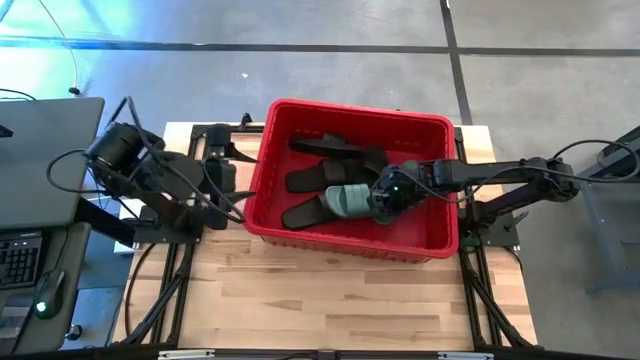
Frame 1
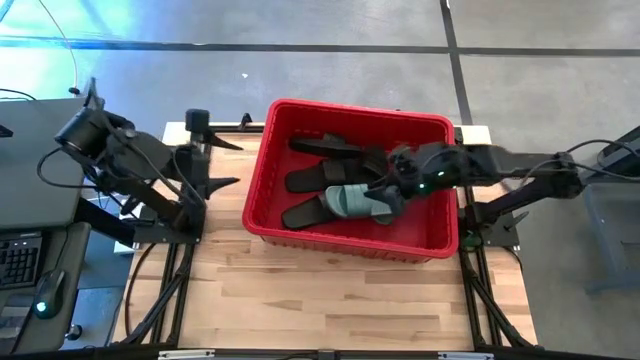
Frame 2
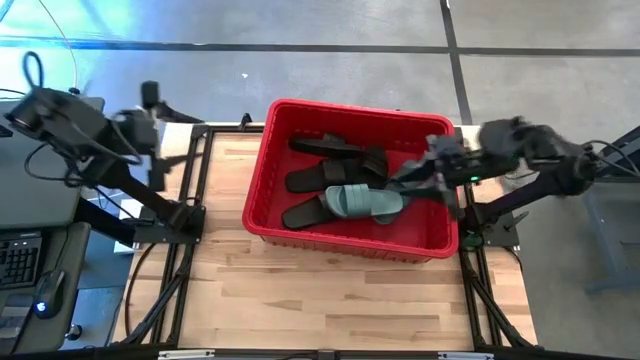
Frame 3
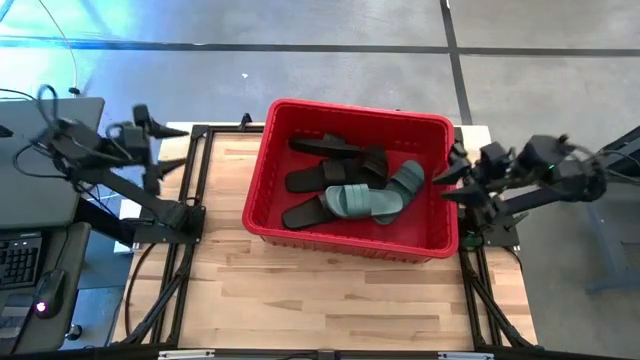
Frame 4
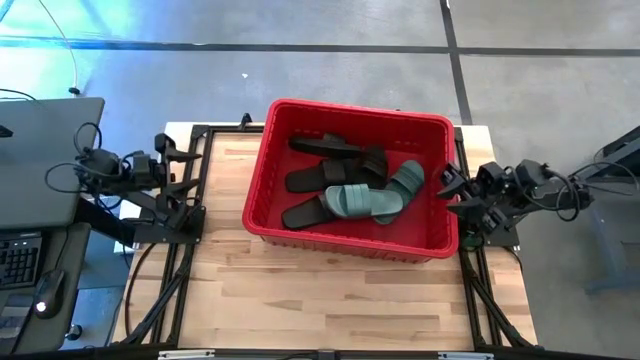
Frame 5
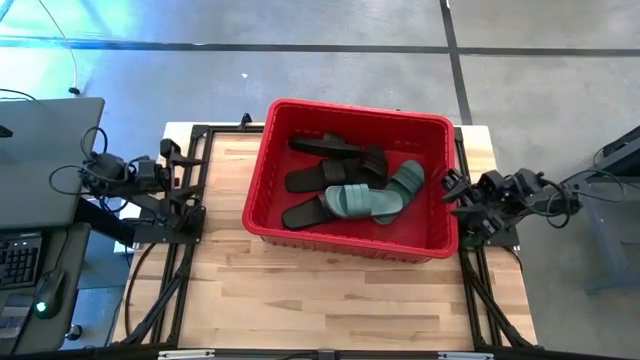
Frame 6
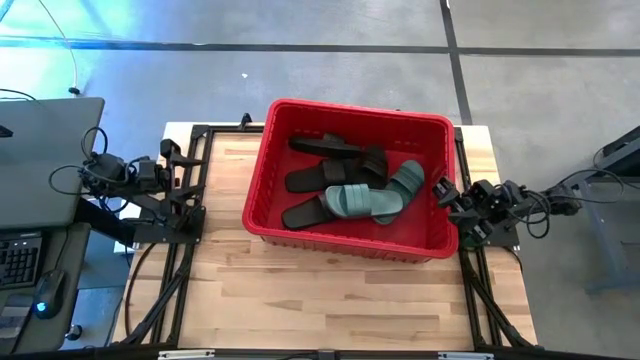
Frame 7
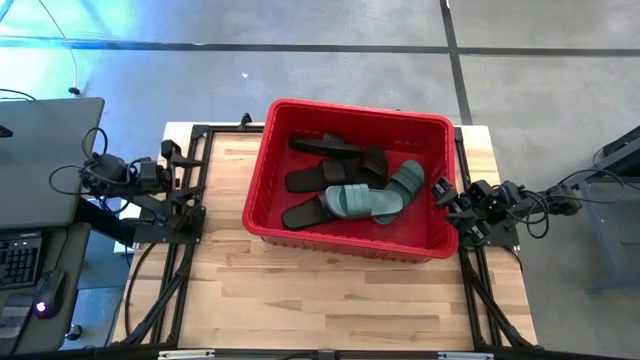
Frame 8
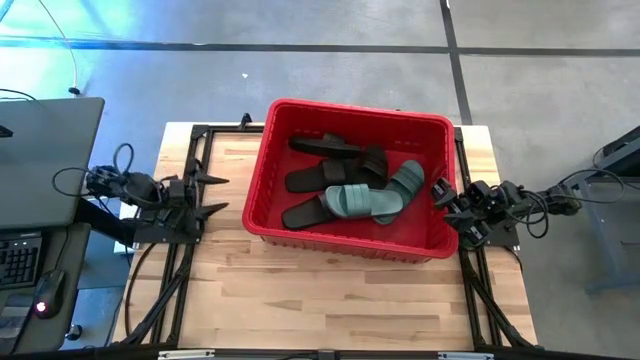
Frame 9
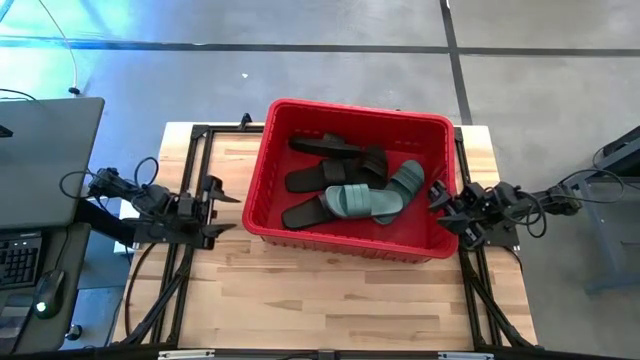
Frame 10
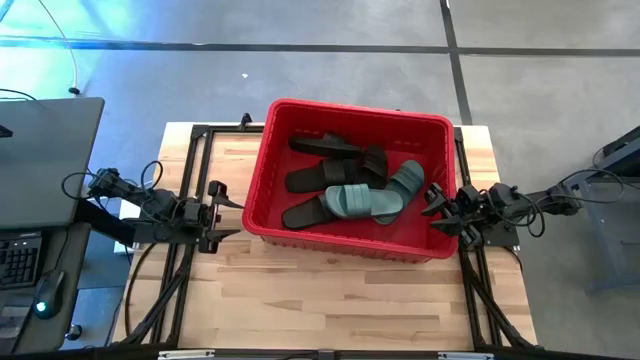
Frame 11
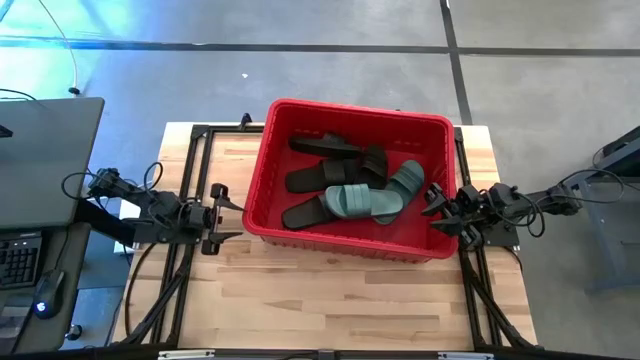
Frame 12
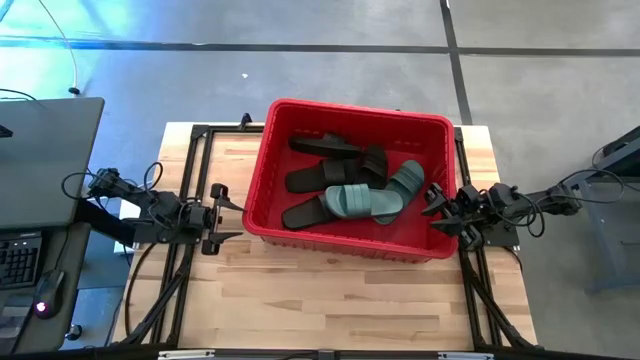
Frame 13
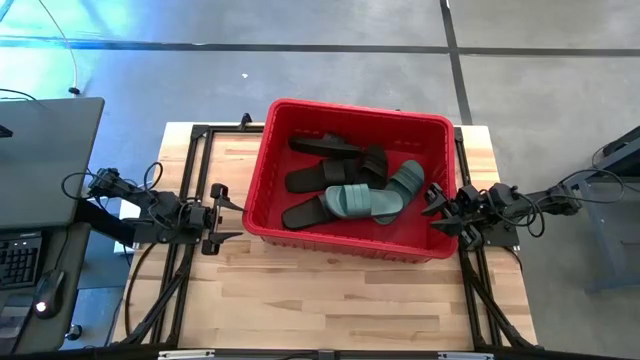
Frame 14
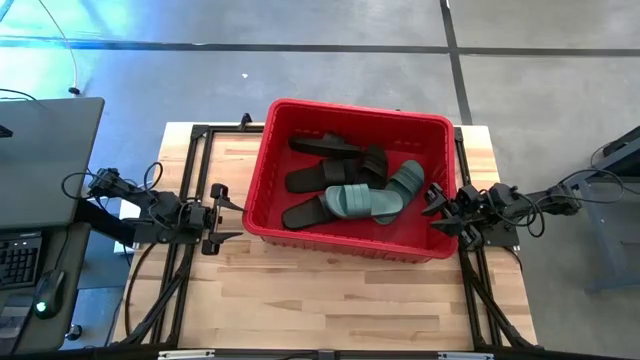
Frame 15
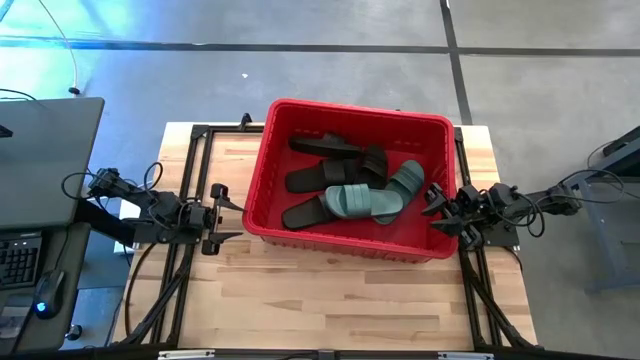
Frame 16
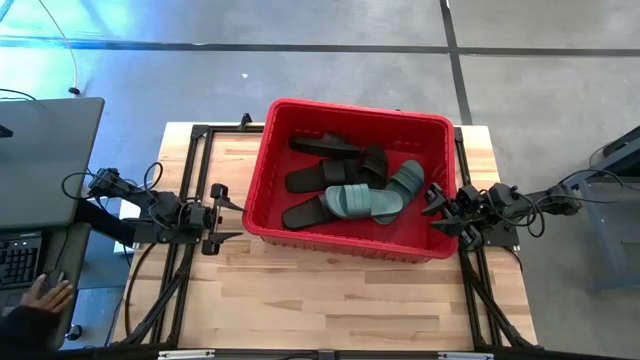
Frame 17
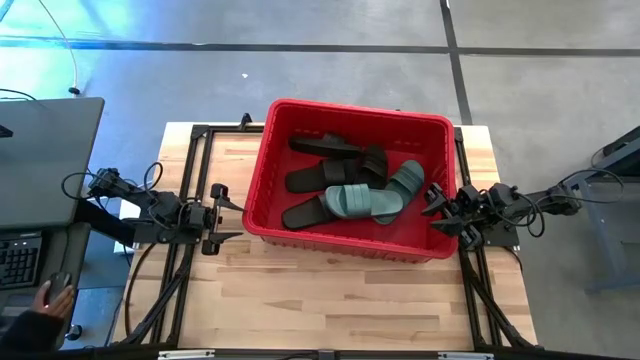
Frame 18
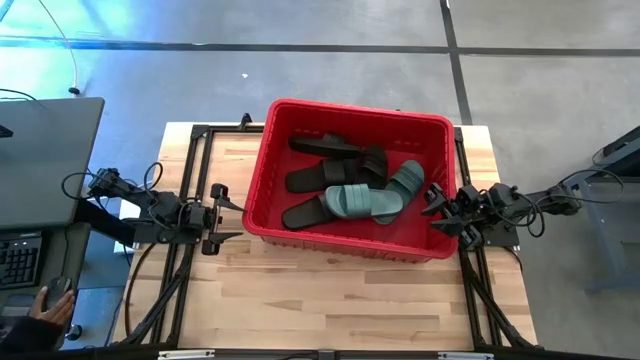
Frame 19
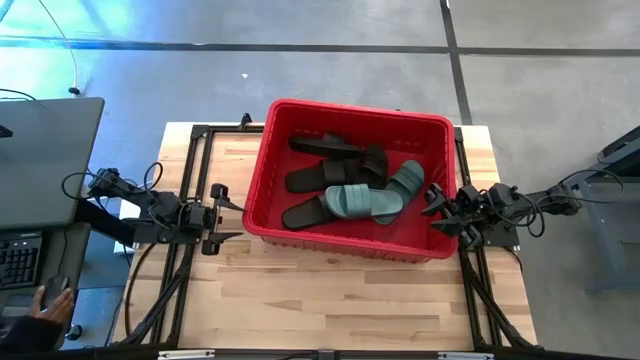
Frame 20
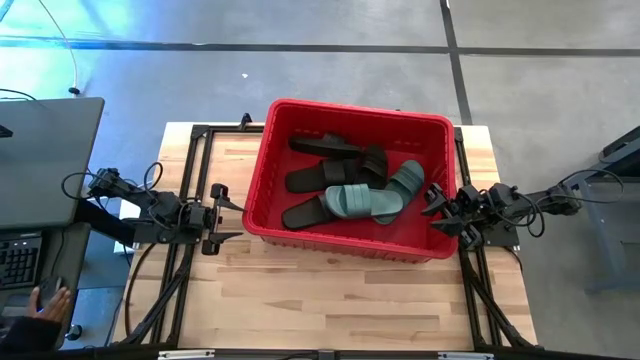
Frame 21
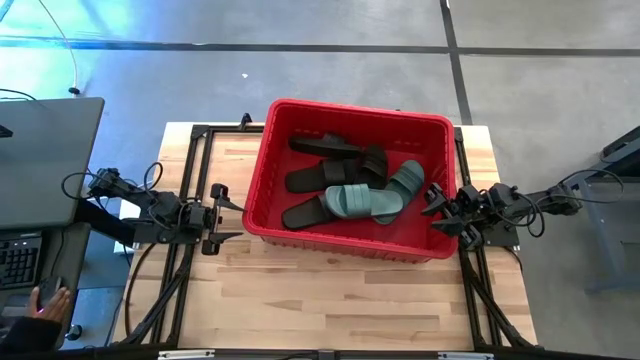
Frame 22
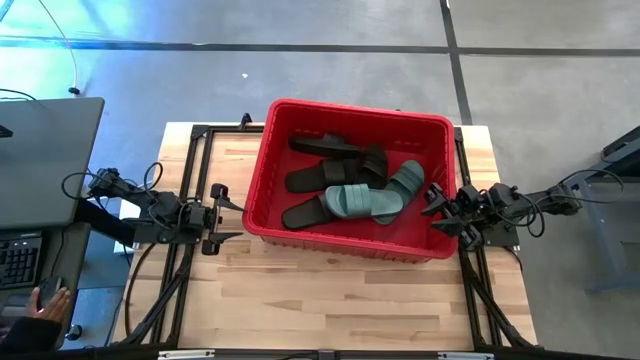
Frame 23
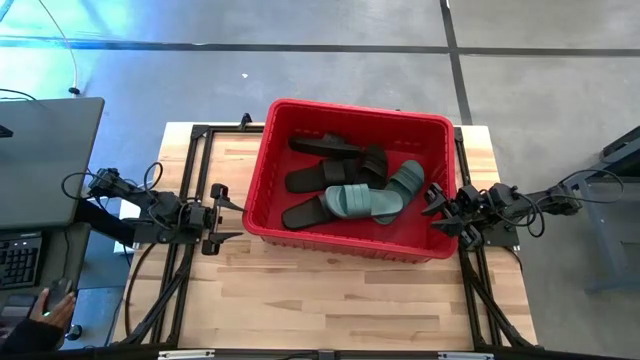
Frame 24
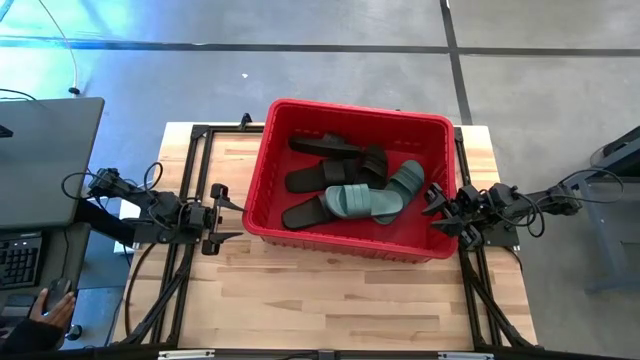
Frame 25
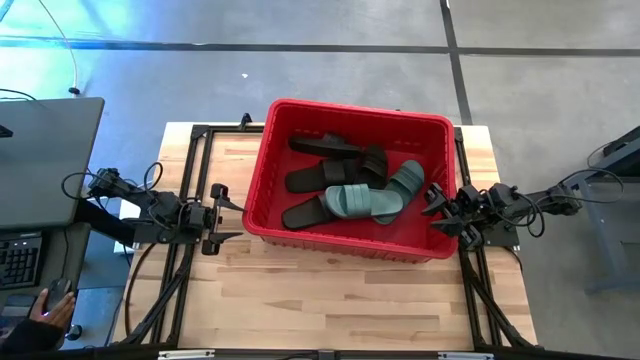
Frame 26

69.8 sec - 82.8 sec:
Task: Pick and place slides into bin
Return to Home Position

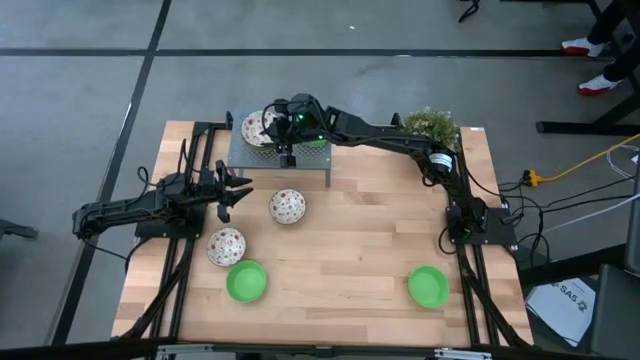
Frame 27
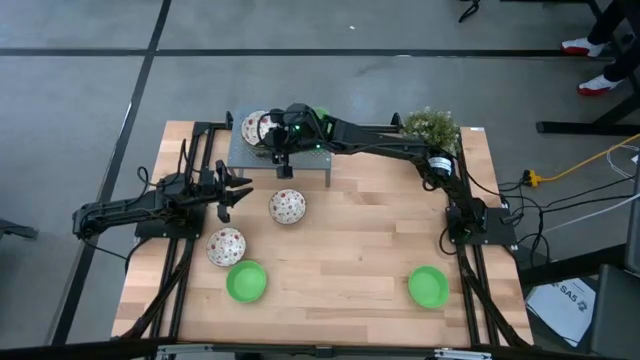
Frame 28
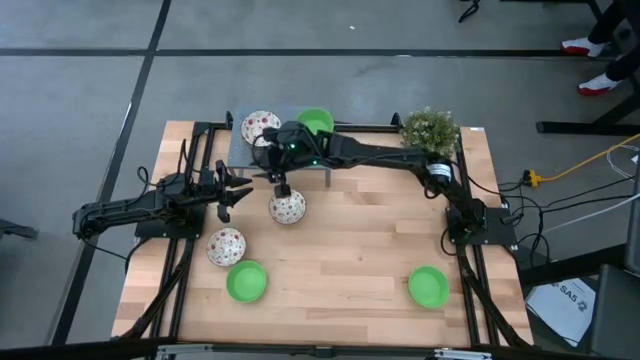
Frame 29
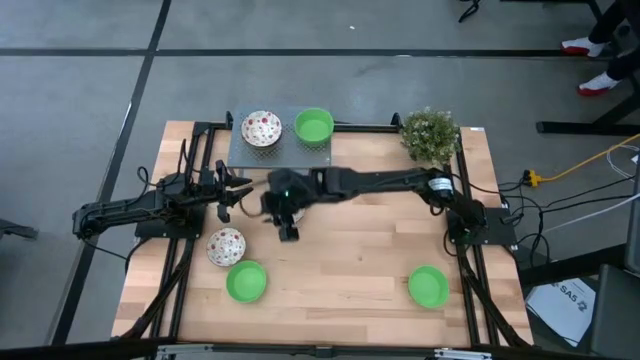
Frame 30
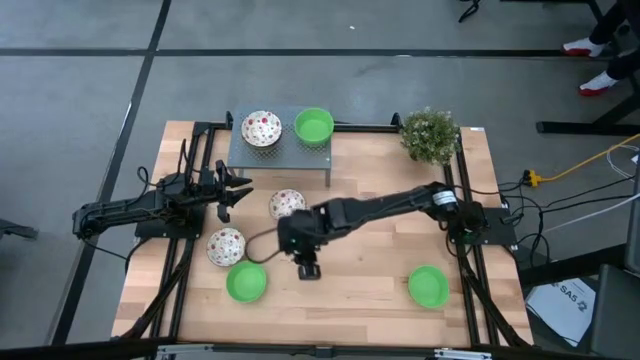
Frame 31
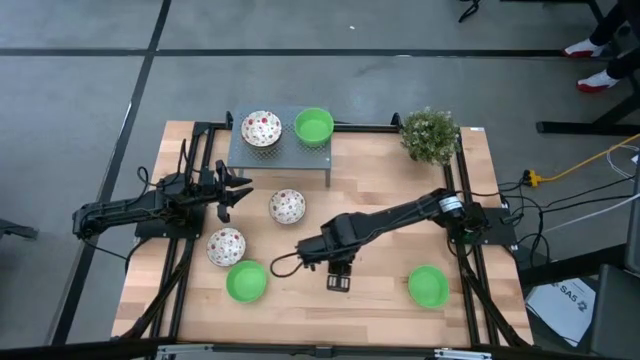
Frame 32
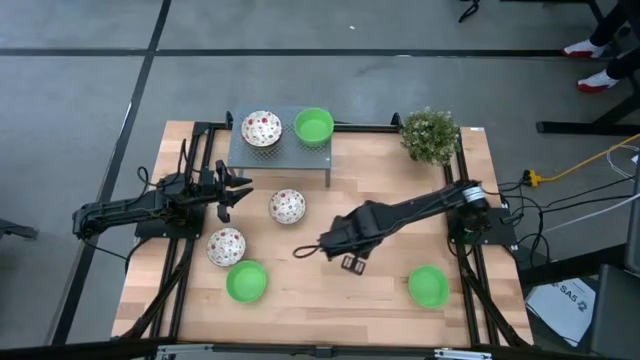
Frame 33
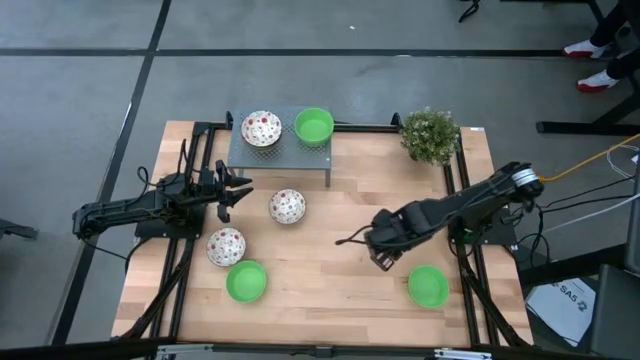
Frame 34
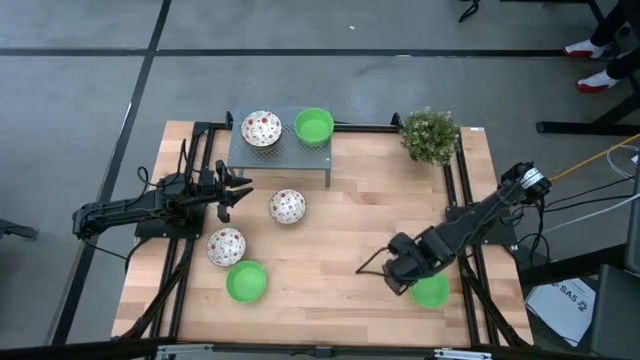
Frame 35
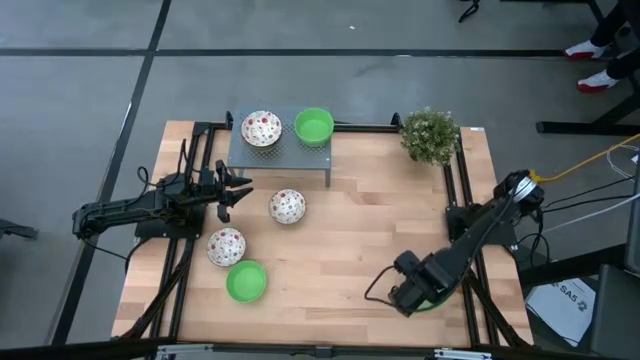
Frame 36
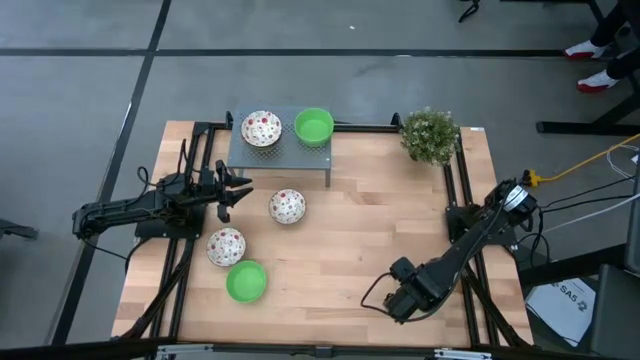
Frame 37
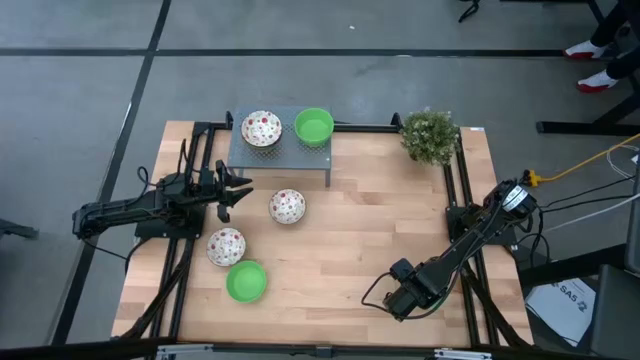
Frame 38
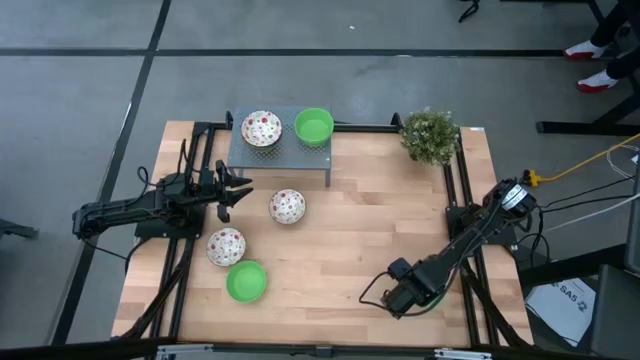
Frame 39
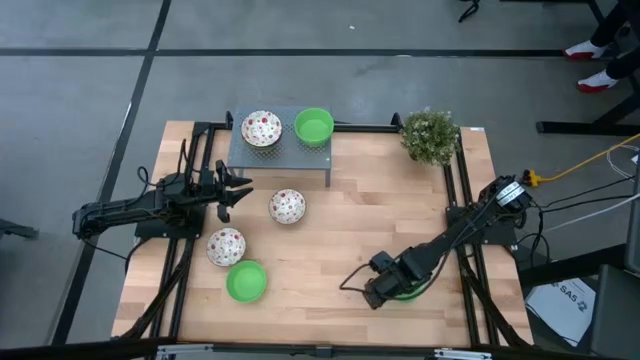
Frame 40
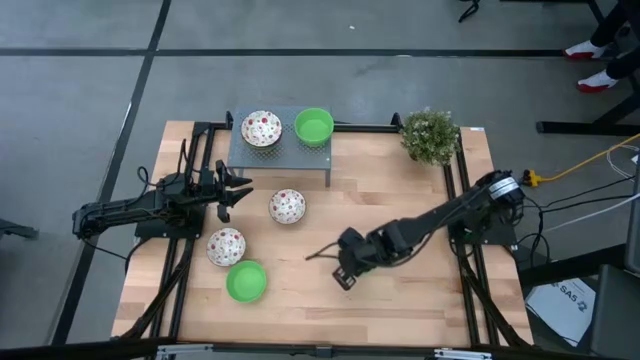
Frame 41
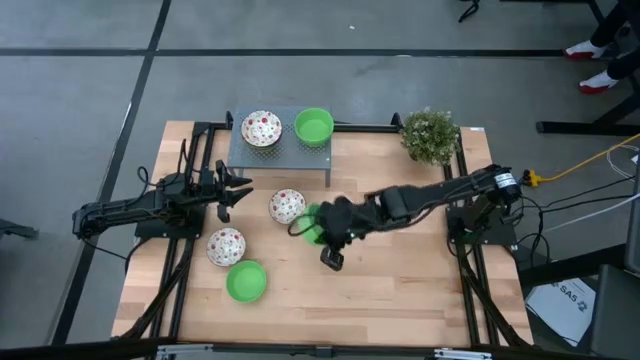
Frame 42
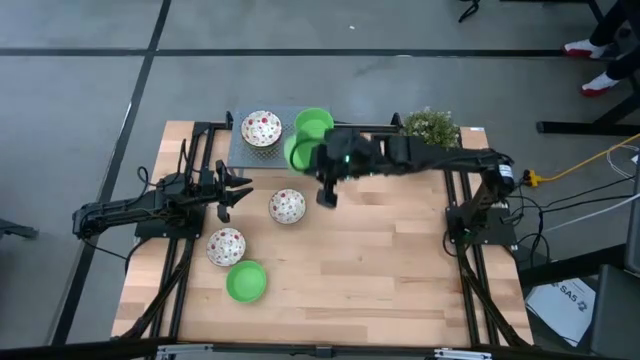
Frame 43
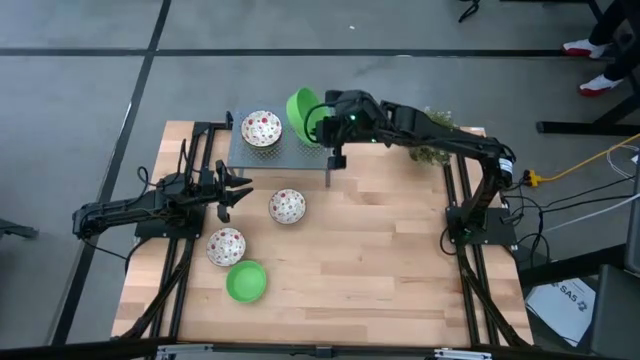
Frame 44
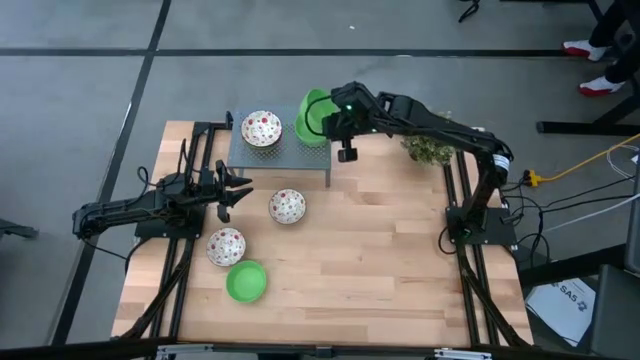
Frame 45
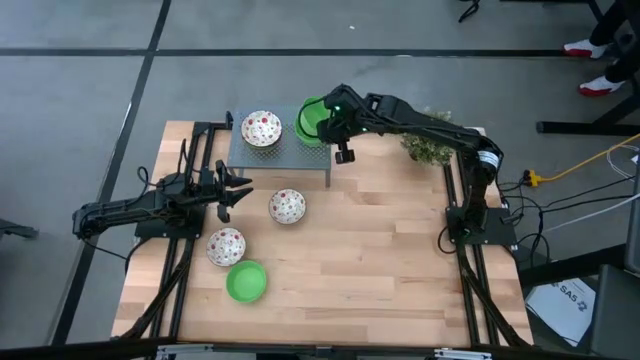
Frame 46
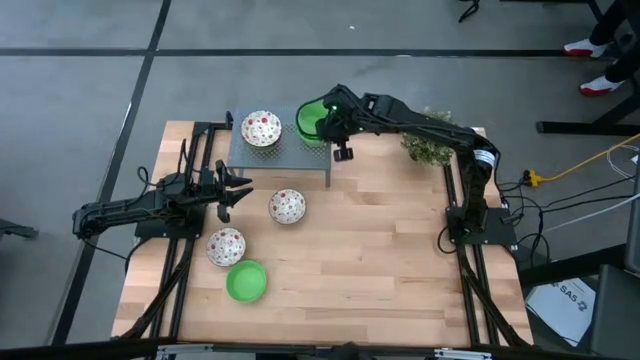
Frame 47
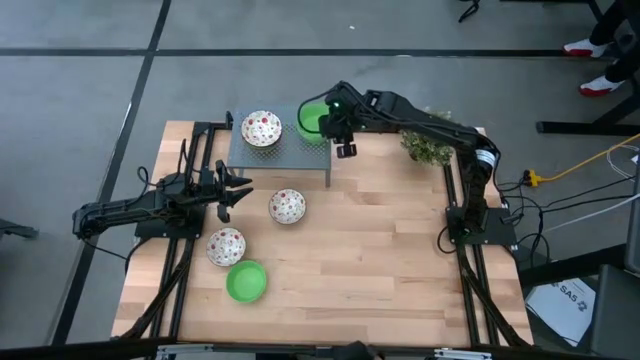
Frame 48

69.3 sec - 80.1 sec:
Task: Pick & Place Mini bowls
Stack the green bowl on top of the green bowl on the shelf
